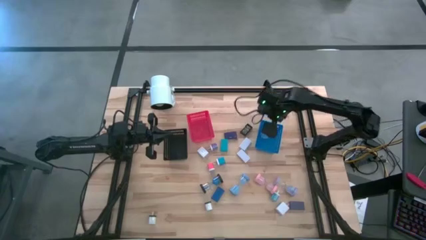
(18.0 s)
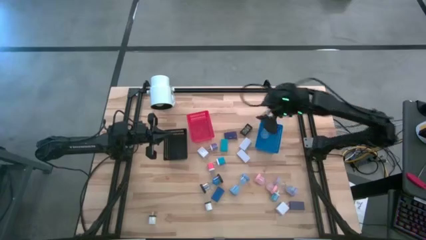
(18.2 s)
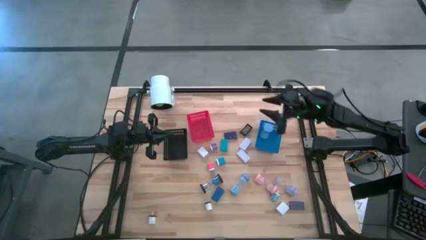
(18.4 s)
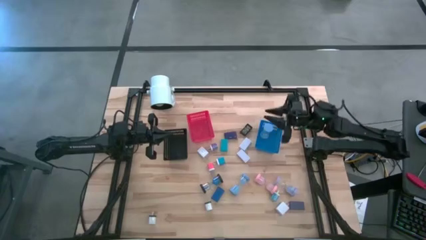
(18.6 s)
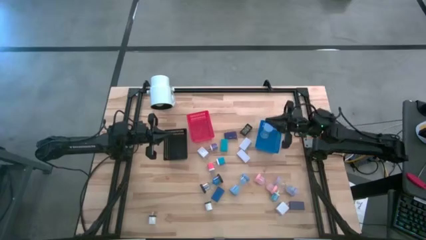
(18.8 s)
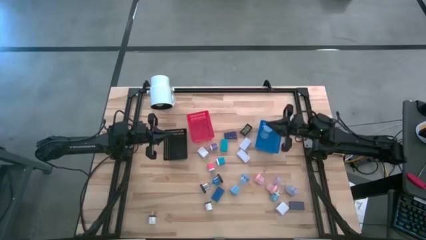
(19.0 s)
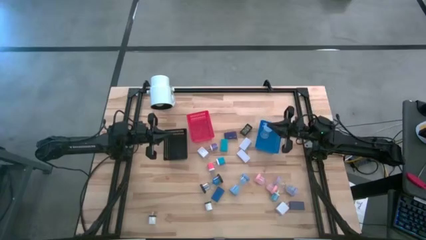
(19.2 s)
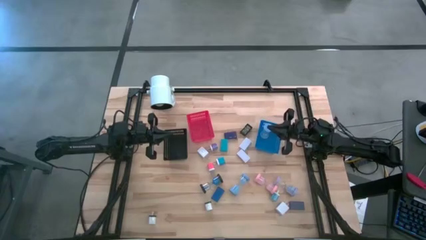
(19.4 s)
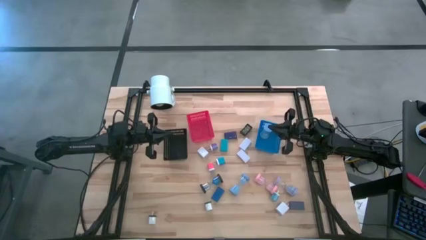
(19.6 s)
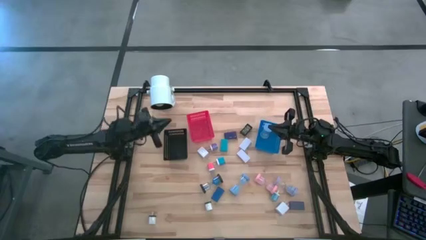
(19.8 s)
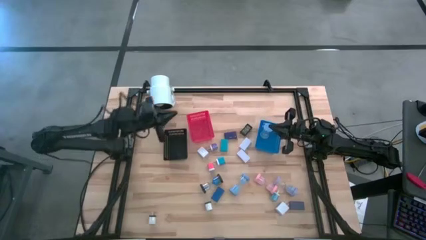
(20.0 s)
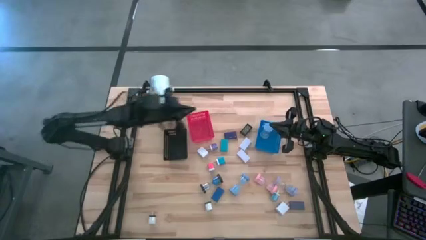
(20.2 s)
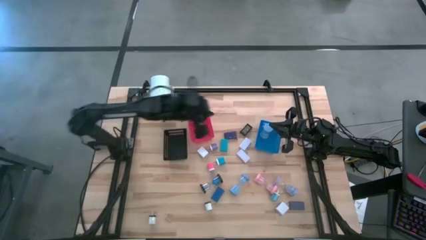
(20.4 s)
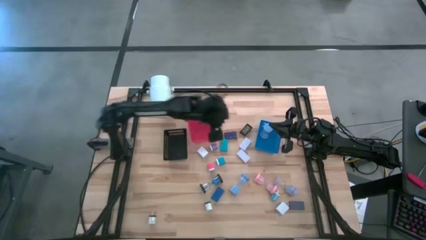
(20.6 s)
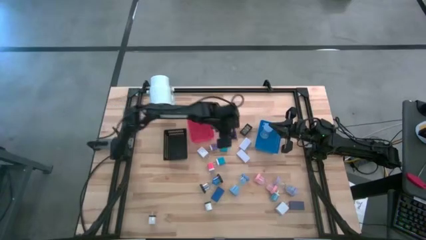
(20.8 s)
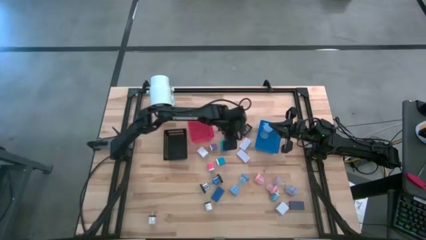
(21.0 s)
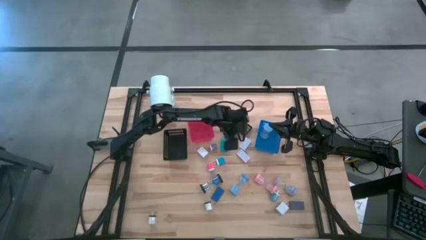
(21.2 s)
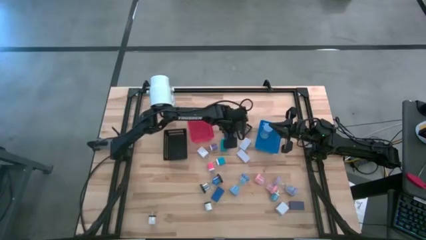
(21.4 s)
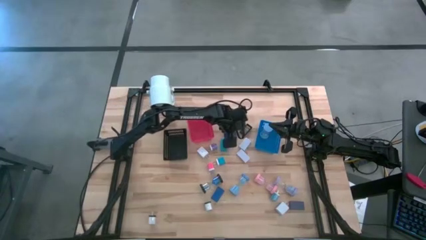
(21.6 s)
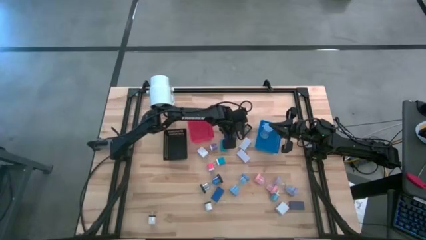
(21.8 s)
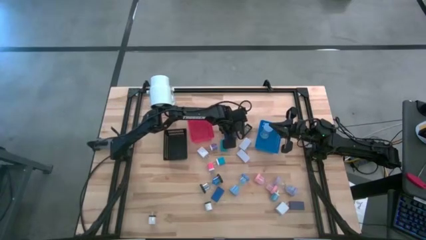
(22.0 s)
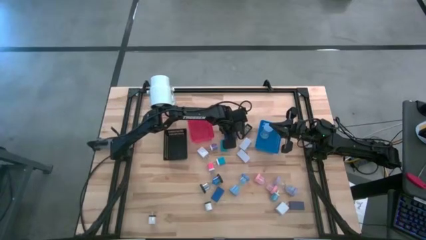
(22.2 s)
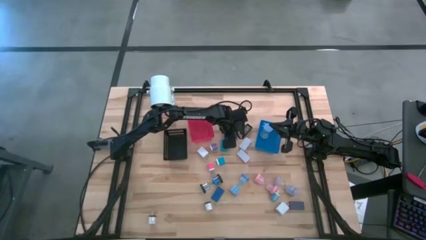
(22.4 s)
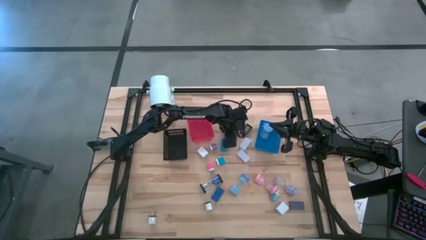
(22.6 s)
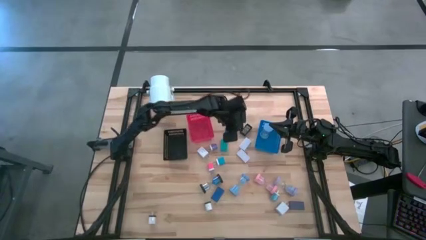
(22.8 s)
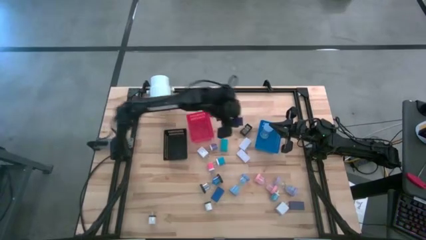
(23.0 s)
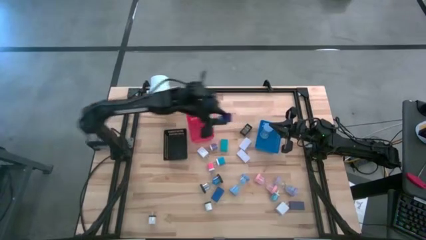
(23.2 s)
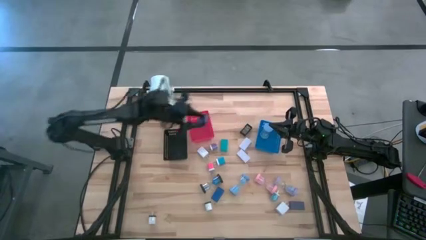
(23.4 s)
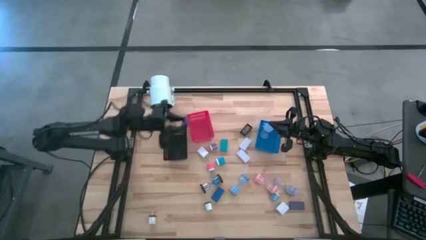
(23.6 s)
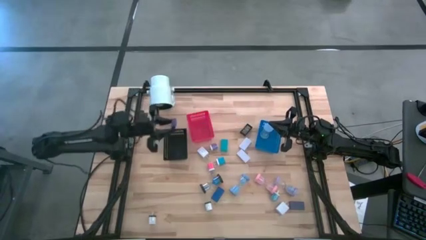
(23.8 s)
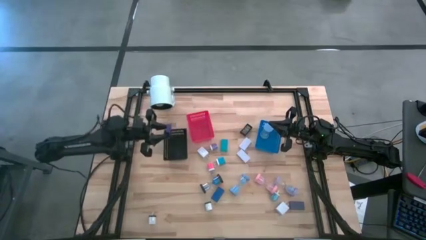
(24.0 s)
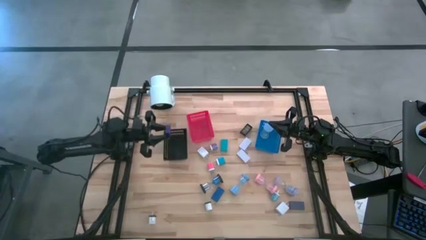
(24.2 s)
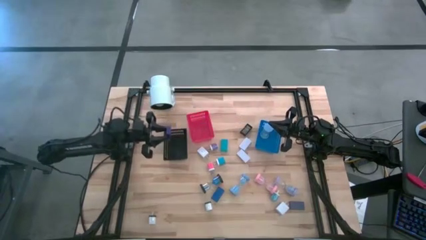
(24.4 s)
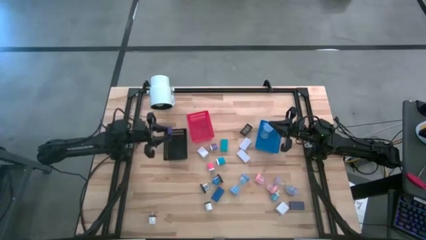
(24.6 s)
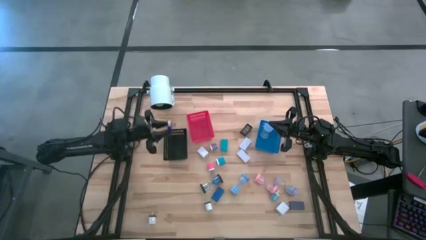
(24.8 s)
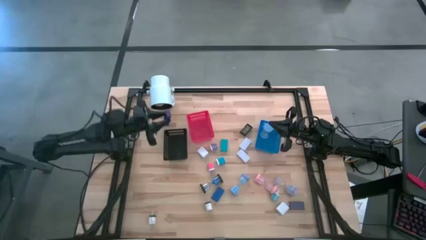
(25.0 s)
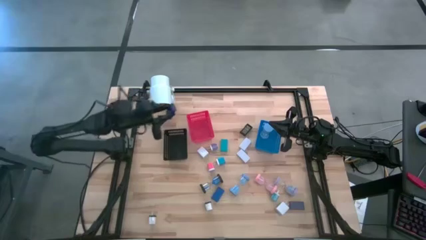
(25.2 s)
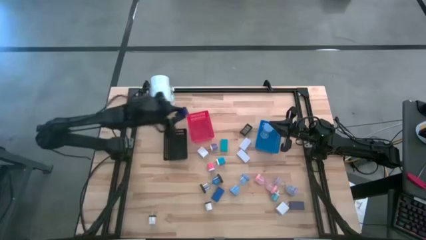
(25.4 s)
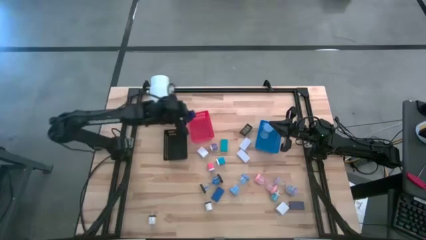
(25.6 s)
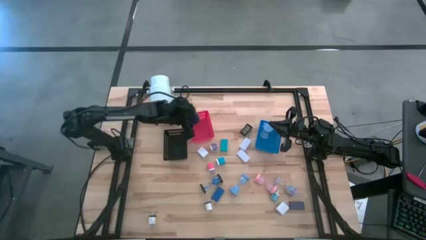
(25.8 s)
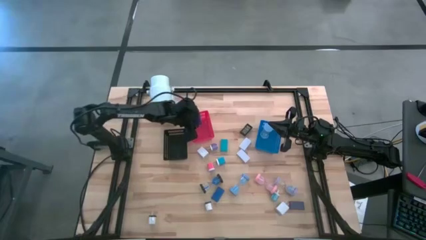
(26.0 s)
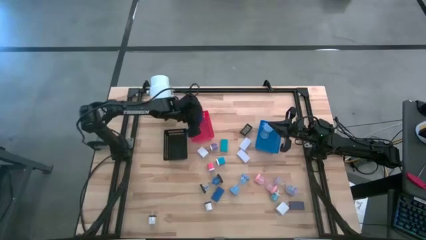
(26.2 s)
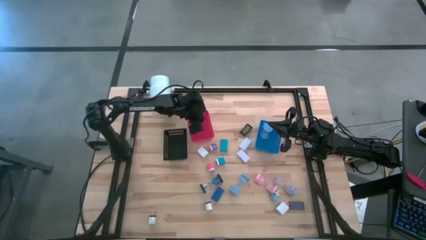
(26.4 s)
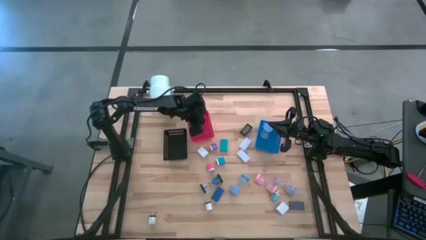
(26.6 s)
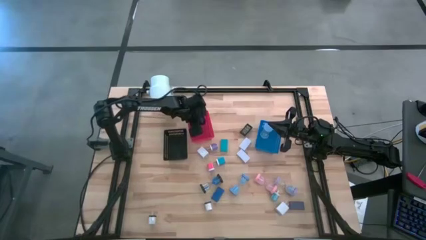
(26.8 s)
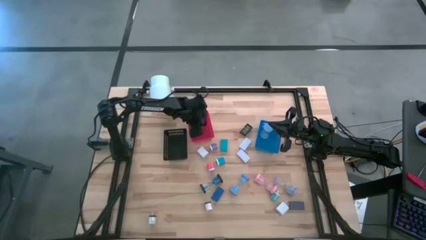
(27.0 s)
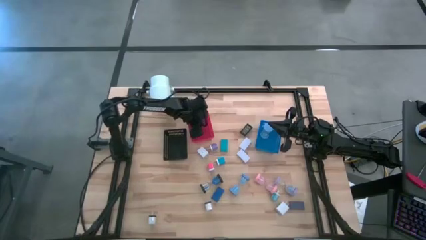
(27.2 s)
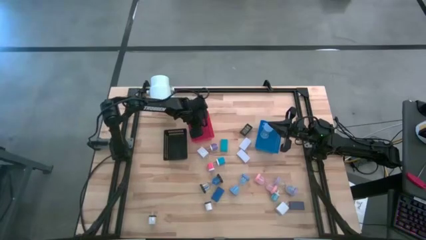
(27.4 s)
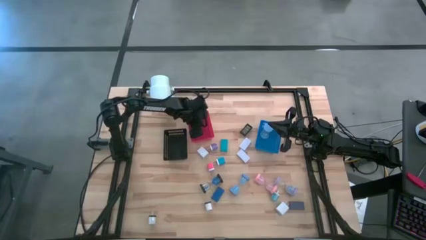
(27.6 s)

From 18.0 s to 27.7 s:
Task: Pick & Place Office items
Put the top violet digital clock into the red bin

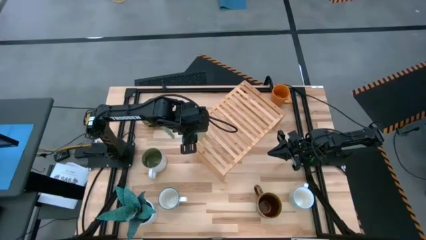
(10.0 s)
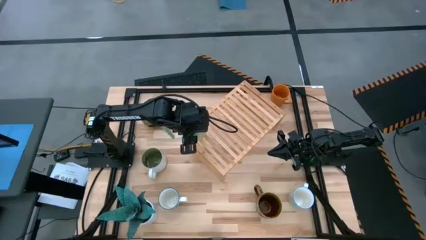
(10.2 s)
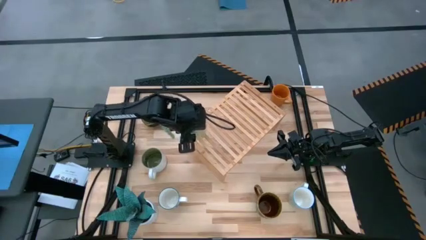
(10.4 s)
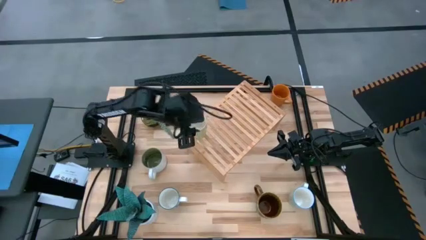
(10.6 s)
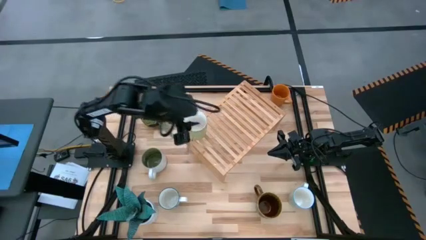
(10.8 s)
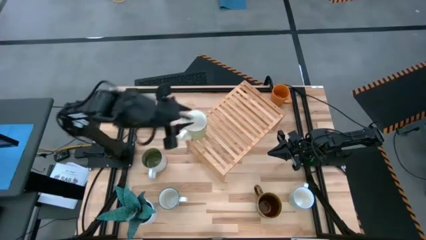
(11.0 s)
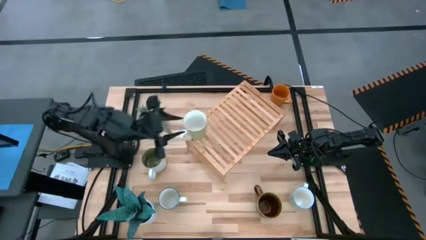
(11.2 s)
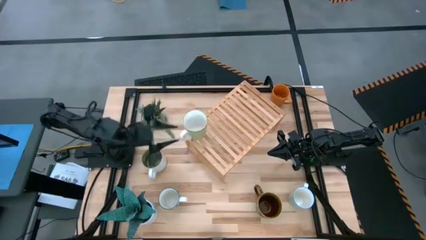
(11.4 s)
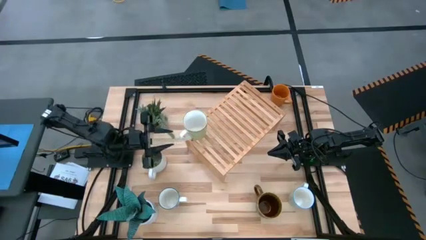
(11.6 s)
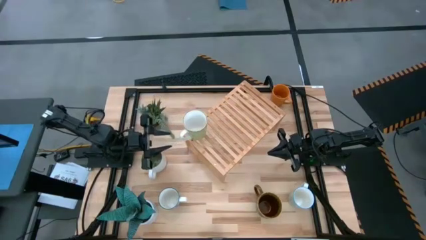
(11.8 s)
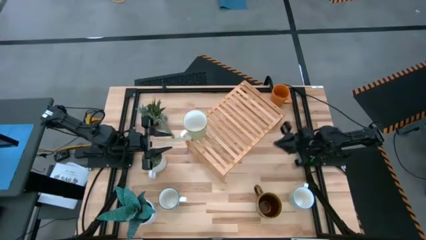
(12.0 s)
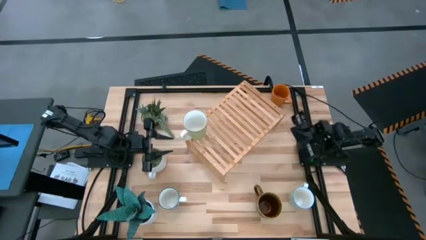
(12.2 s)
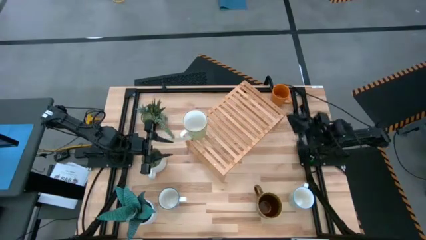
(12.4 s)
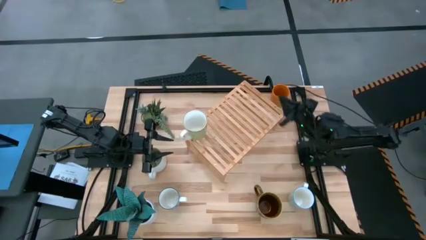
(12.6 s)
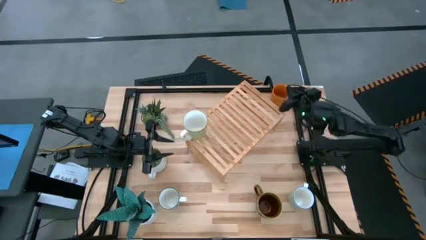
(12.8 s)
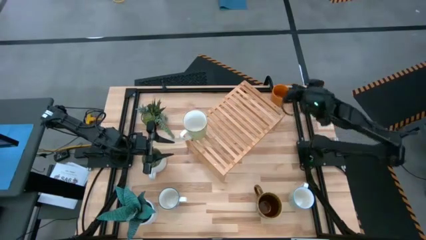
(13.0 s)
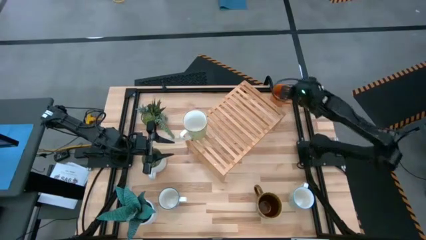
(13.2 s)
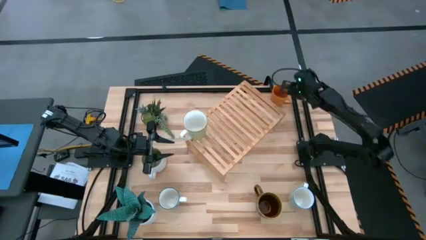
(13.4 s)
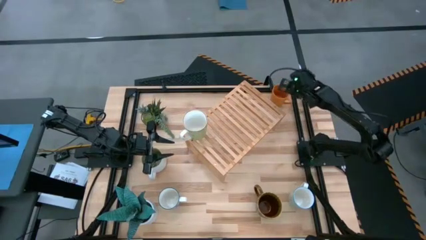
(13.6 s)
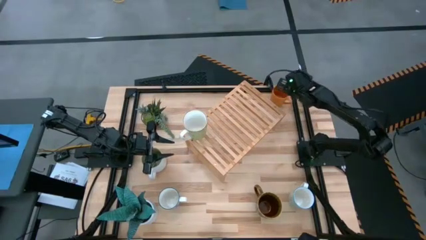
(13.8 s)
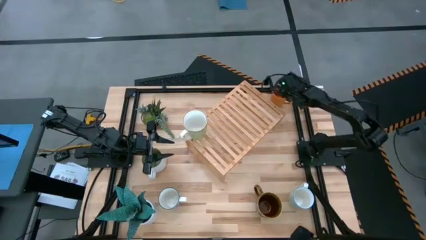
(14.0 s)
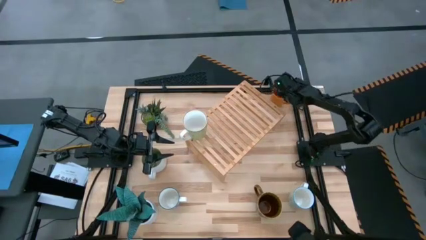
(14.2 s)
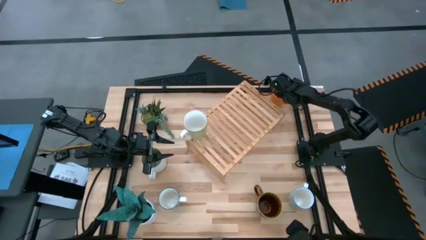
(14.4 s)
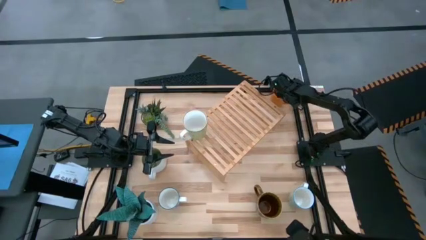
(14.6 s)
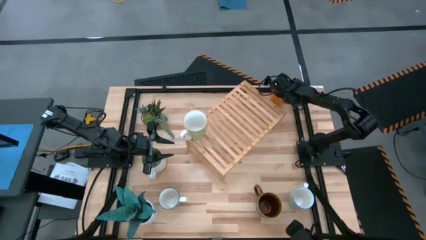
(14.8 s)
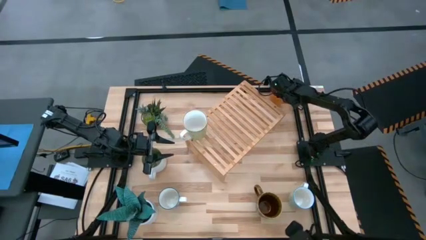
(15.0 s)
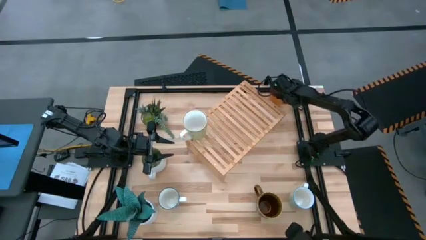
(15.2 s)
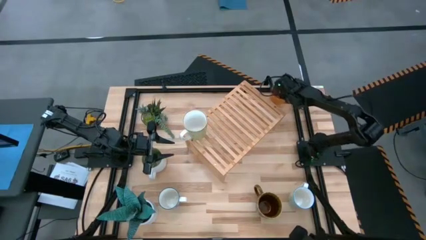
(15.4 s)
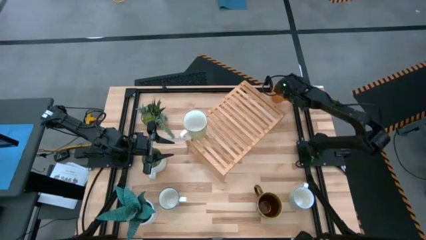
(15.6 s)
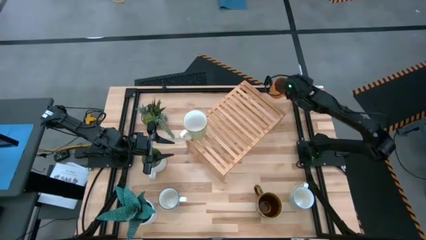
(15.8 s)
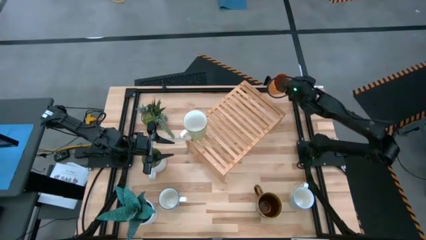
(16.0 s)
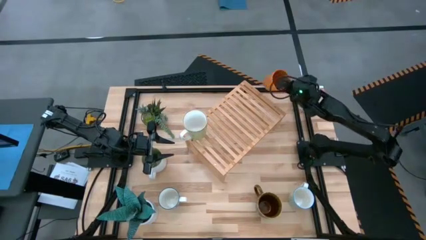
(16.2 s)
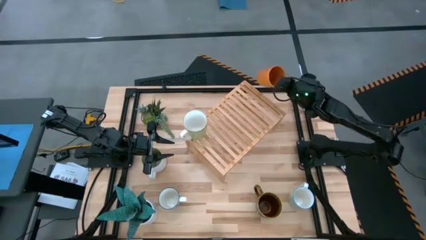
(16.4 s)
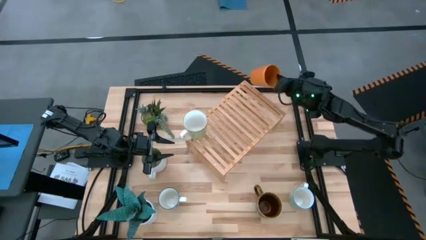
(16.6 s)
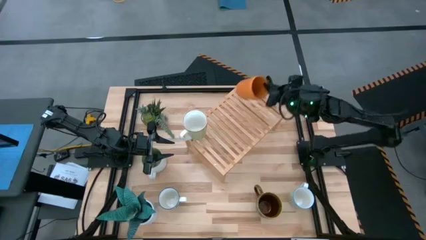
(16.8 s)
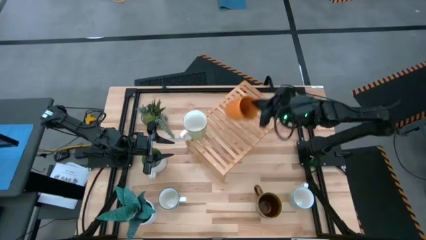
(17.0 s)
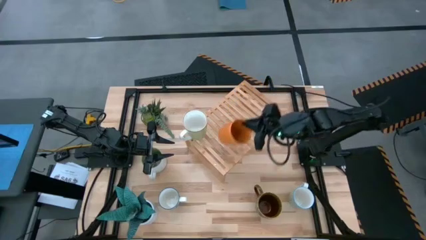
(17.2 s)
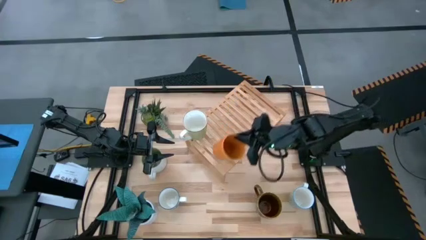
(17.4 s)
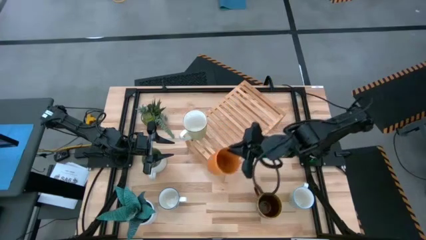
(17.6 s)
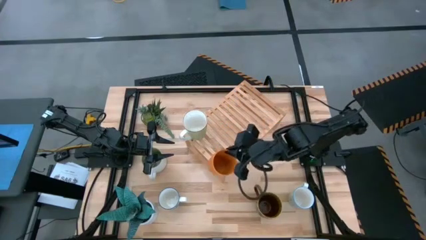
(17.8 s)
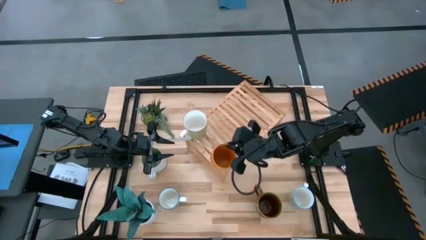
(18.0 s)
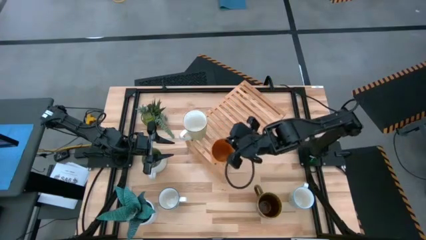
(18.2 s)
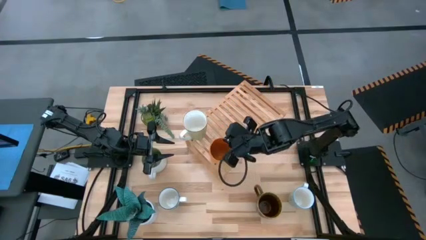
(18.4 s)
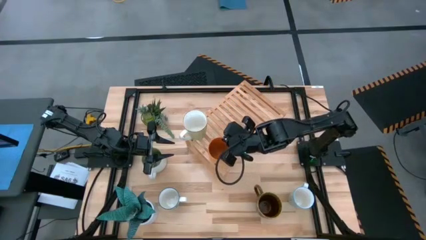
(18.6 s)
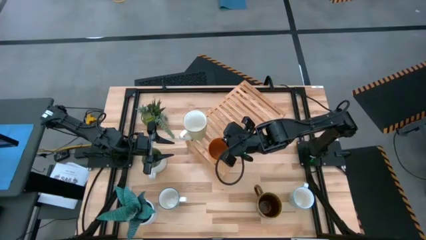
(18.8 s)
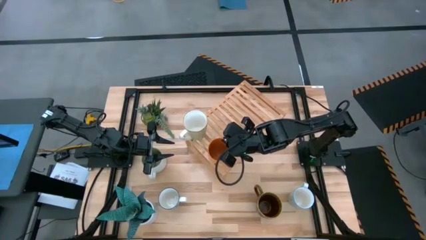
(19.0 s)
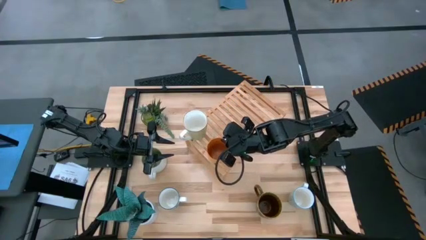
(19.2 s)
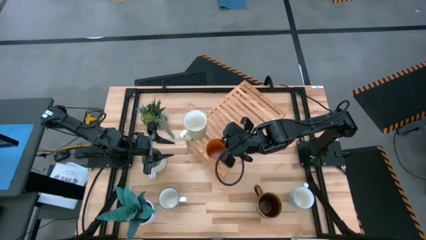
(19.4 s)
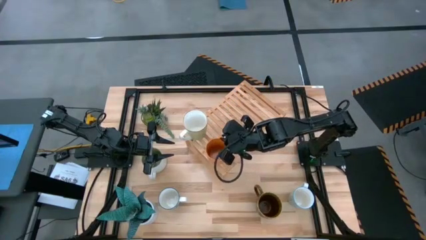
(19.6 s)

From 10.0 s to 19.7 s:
Task: Place coffee mugs
Put the orange mug on the shelf
